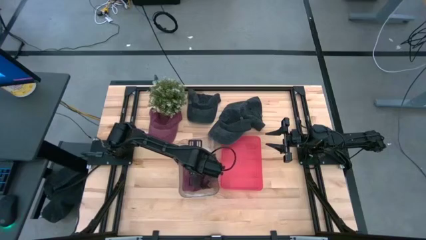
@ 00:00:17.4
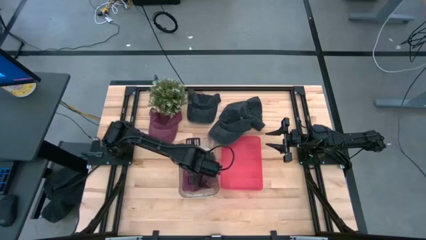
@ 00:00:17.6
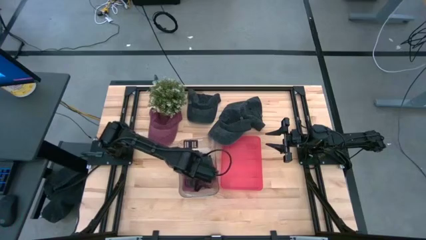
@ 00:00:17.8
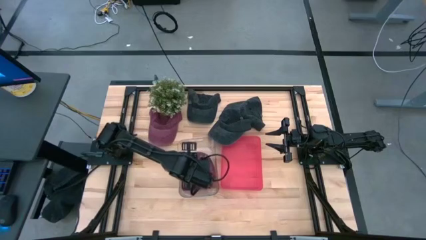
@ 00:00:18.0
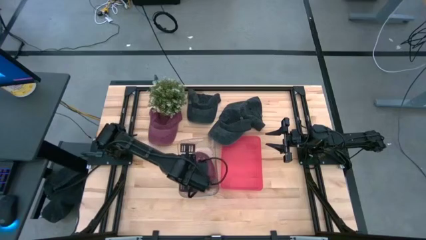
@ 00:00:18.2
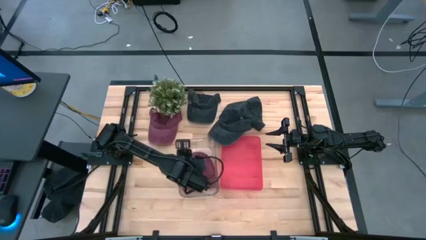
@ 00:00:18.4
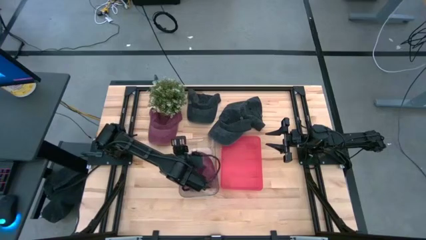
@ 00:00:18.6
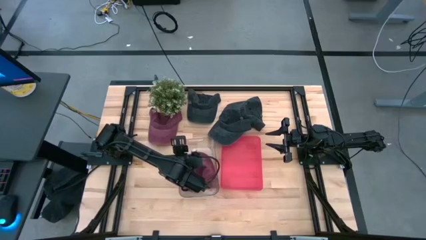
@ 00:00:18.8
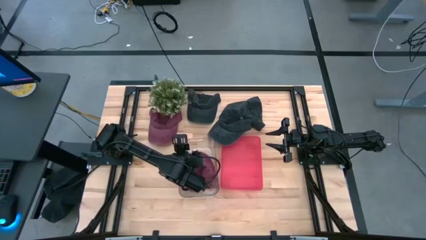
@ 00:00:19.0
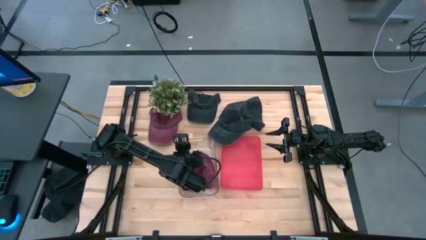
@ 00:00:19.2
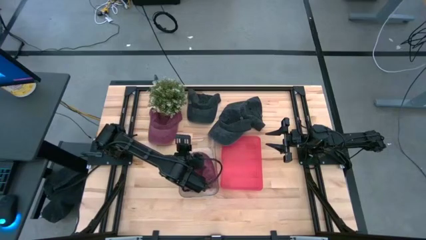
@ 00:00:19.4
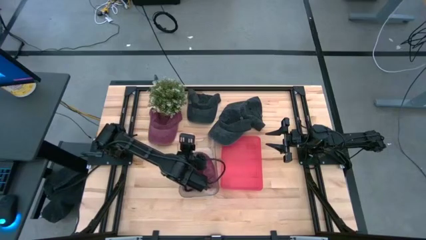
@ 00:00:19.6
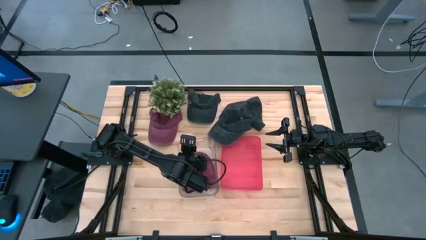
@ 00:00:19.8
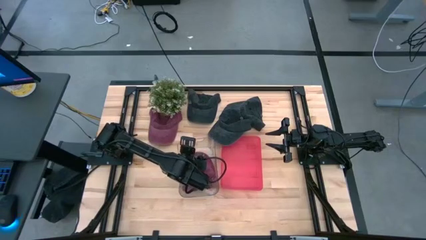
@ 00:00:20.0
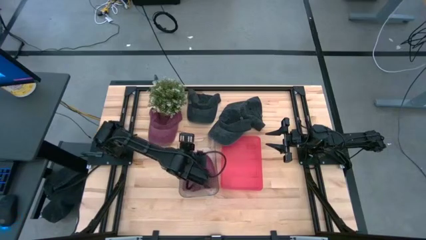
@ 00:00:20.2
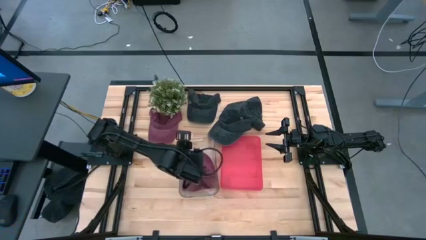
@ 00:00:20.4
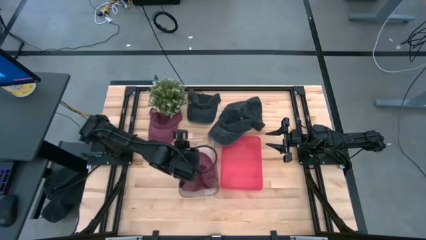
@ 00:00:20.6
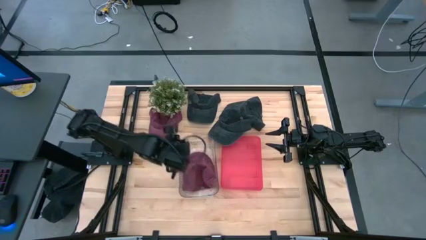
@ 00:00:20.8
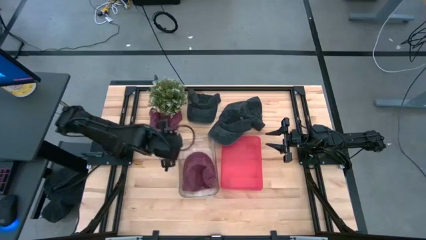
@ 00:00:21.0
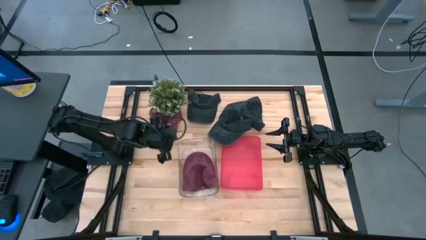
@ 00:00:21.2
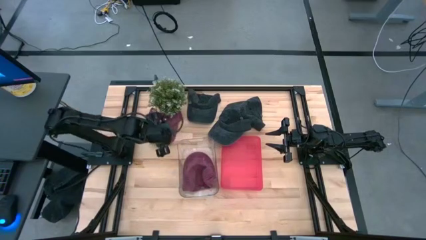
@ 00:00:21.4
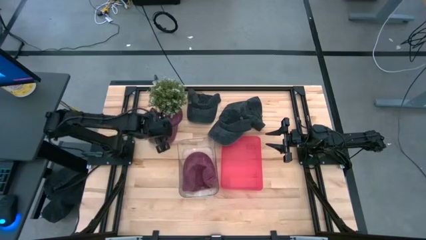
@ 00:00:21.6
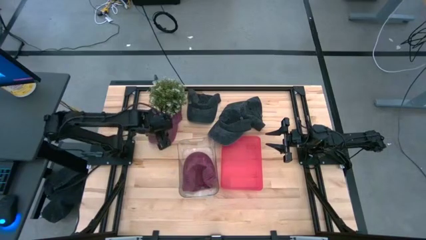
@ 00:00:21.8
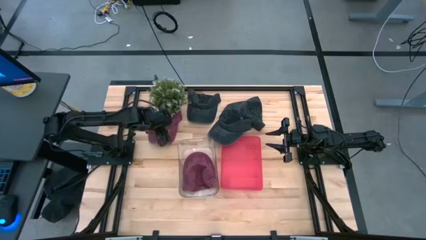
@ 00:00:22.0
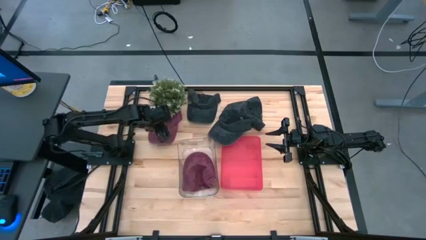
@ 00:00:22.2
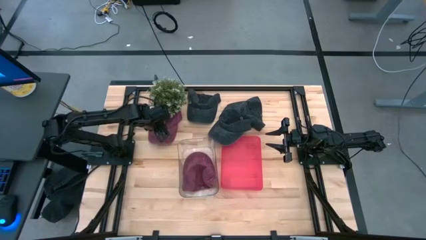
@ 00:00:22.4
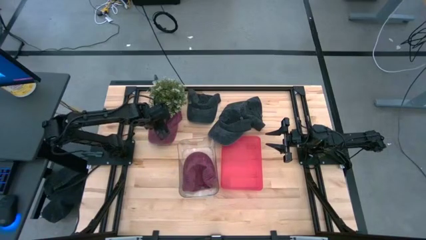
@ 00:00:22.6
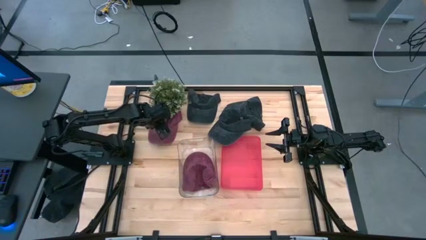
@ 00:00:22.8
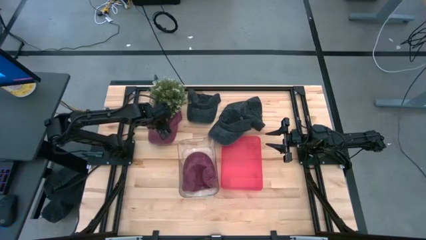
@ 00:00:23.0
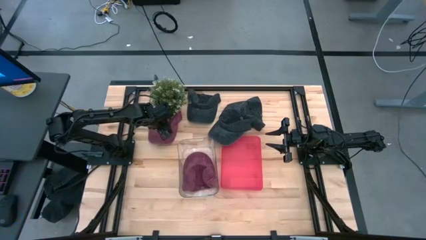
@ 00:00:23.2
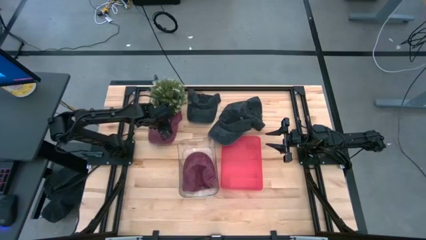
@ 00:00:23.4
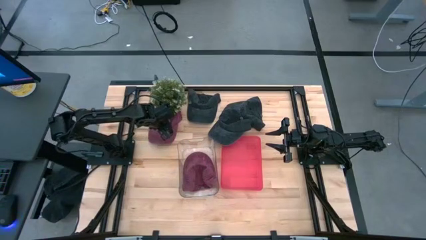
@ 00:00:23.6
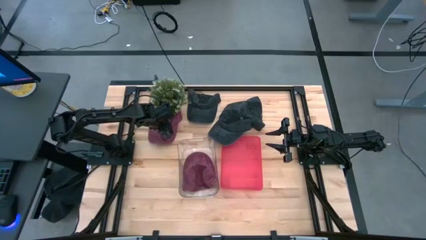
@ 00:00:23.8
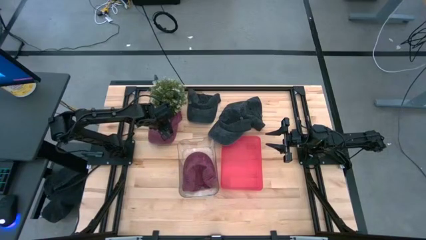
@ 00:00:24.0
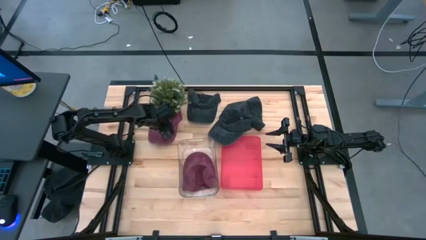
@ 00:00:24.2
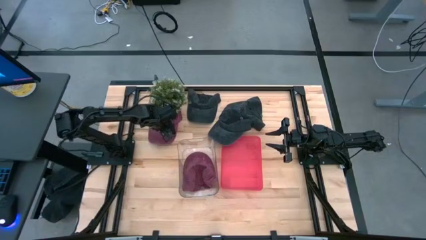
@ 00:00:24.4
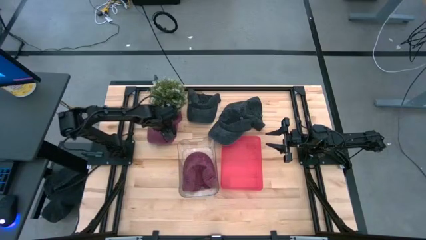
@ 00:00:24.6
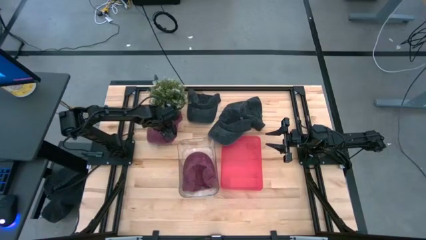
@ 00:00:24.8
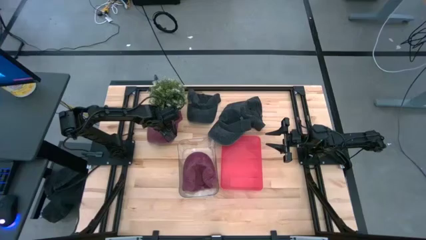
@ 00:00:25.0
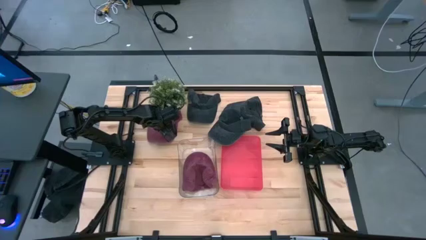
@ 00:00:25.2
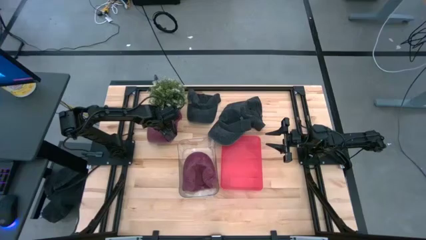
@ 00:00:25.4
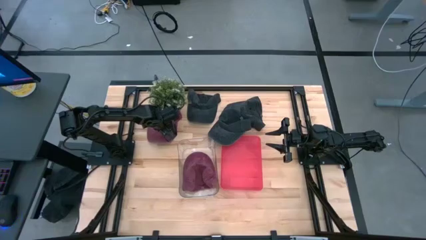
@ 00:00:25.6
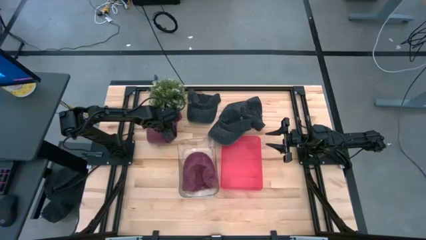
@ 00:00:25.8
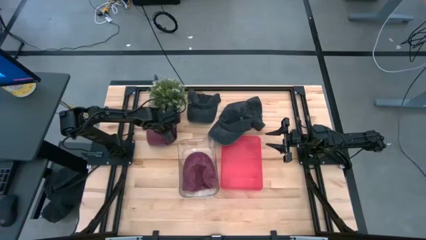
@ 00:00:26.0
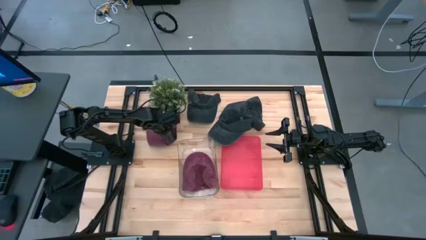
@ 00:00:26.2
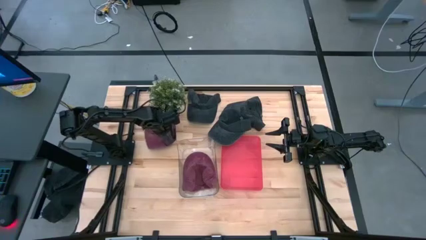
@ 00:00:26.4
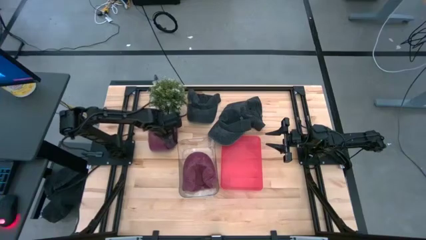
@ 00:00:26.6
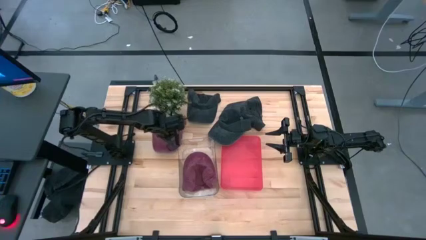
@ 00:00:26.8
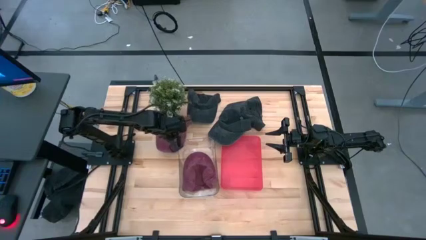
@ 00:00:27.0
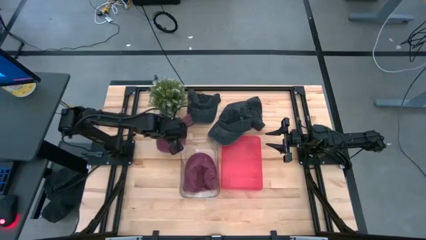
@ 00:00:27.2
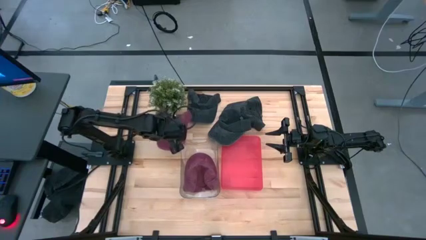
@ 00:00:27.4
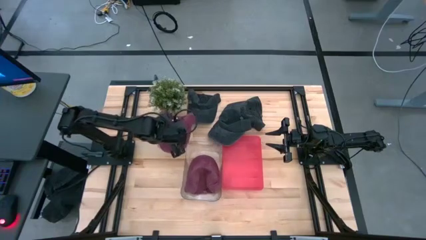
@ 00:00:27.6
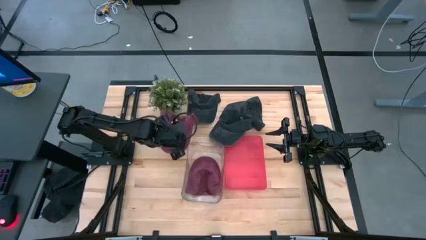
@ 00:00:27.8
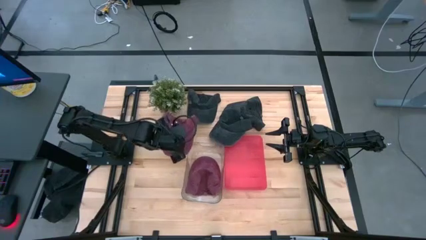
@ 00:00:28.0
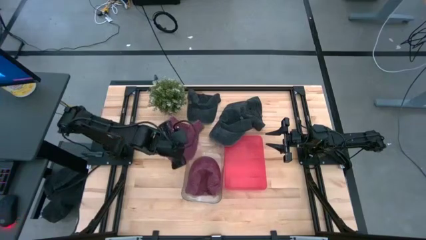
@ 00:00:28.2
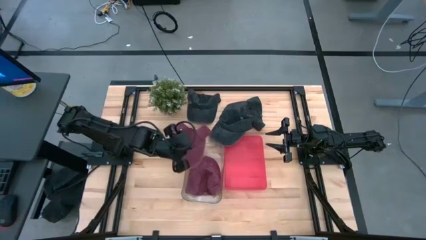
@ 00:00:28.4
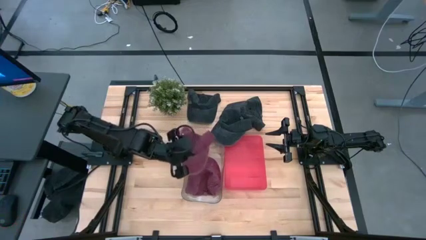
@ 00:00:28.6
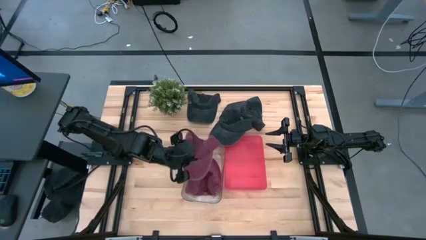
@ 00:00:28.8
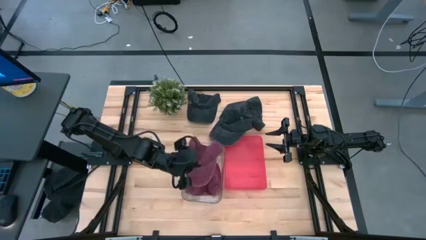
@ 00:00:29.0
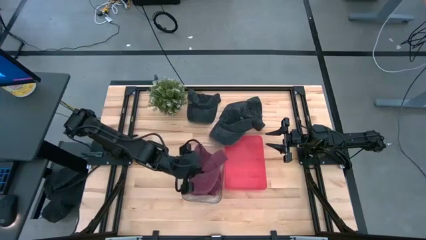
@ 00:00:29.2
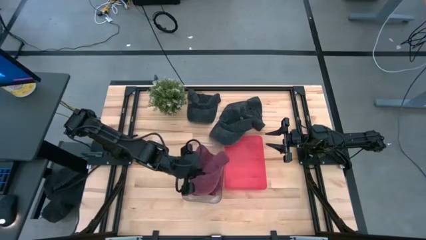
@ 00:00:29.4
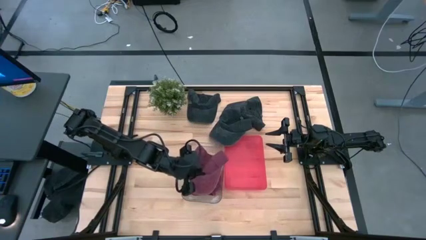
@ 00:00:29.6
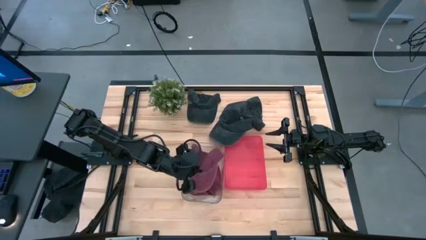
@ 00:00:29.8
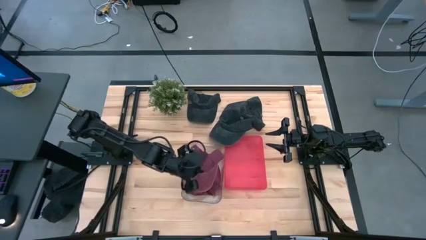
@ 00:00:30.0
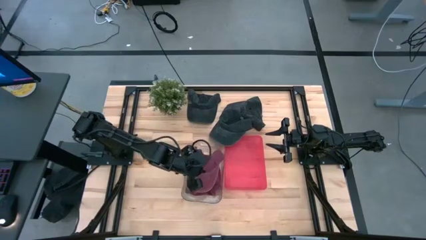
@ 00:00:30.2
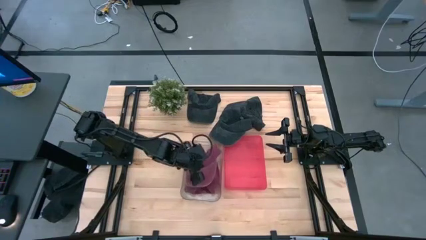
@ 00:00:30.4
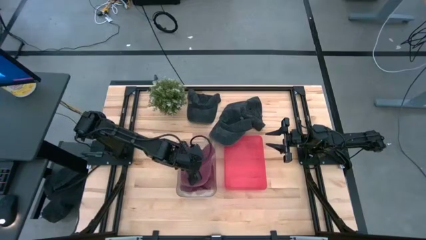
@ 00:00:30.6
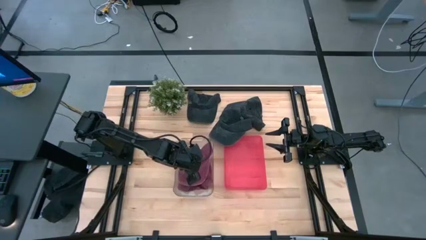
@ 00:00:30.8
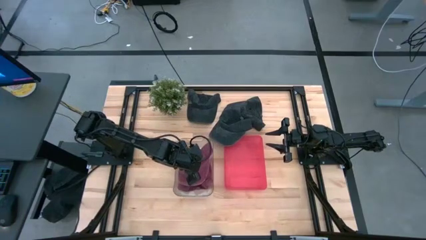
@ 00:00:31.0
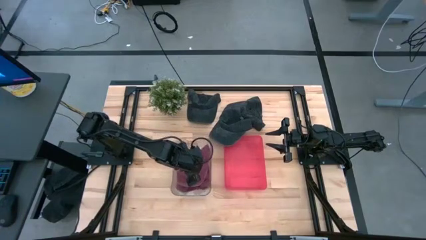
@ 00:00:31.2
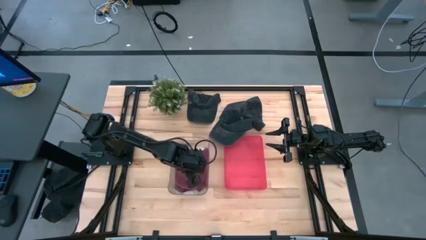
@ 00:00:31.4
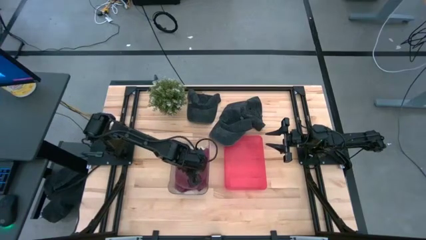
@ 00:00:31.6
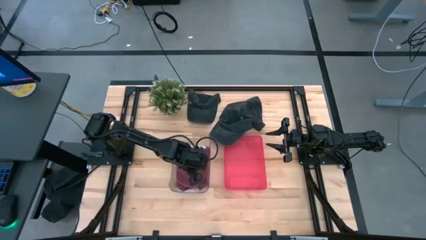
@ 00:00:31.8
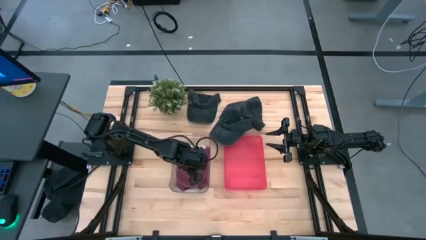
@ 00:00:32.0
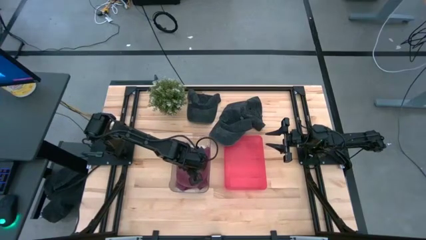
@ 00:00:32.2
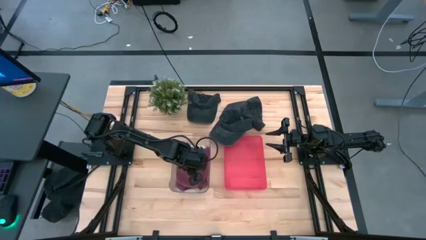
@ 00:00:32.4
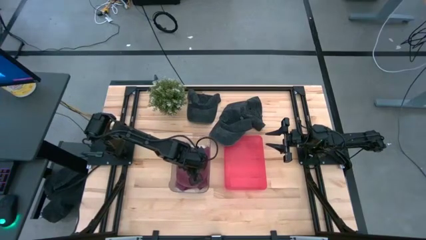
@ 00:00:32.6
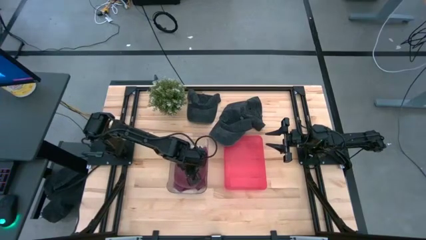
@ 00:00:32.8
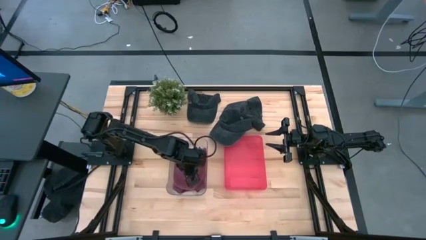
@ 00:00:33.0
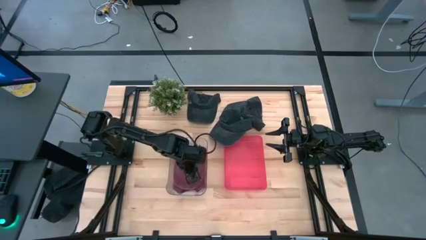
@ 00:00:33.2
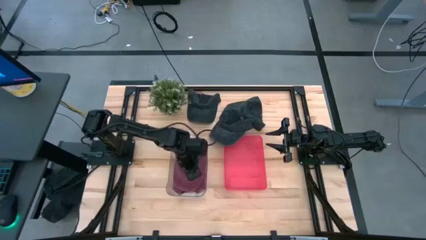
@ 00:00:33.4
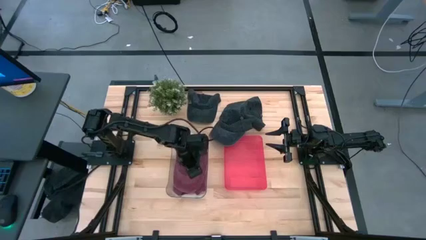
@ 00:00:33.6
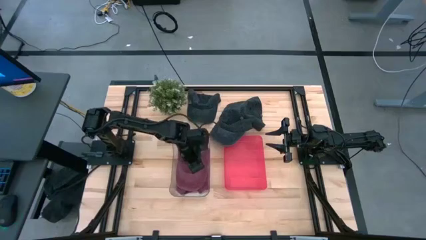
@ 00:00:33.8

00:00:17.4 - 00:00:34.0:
Task: Pick & Place hat
Put the red cap into the transparent bin
